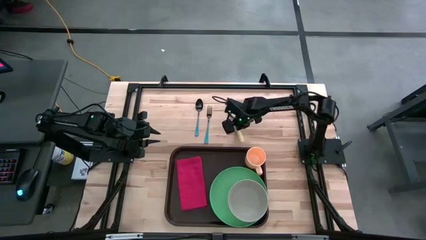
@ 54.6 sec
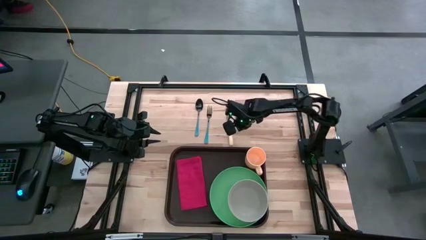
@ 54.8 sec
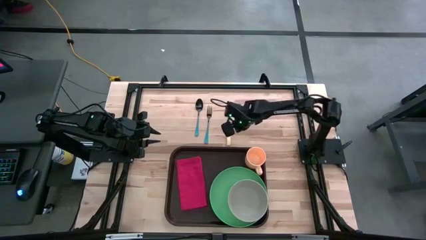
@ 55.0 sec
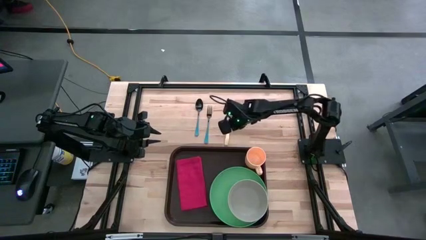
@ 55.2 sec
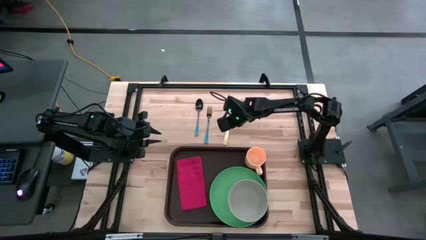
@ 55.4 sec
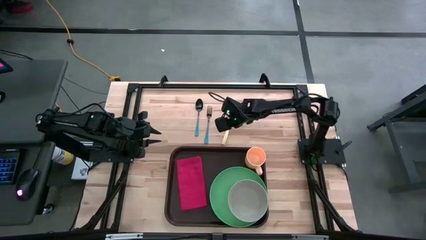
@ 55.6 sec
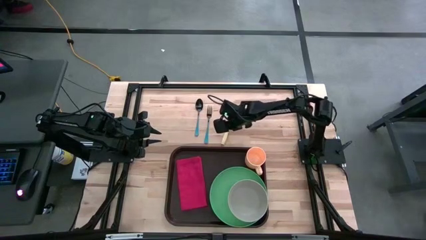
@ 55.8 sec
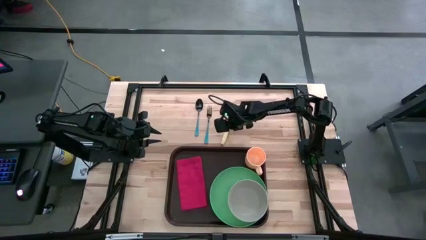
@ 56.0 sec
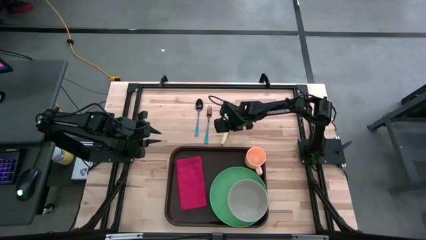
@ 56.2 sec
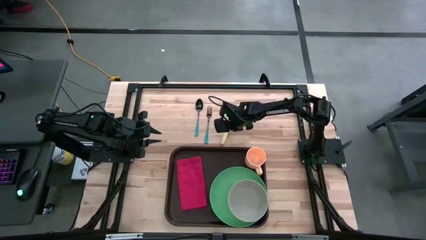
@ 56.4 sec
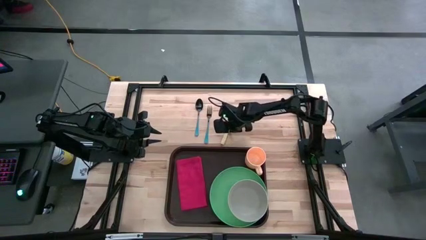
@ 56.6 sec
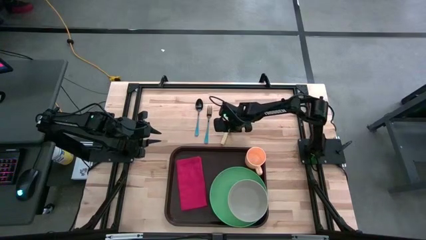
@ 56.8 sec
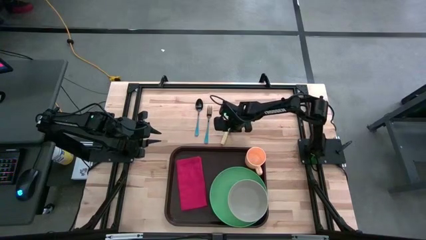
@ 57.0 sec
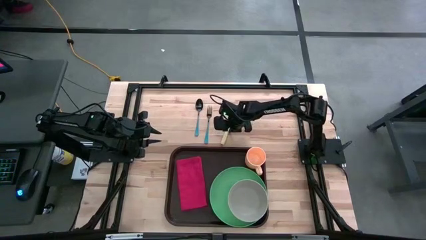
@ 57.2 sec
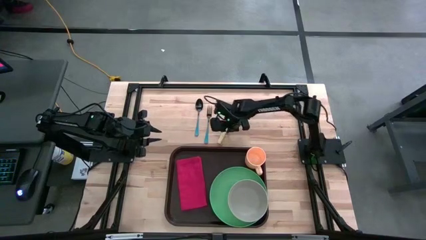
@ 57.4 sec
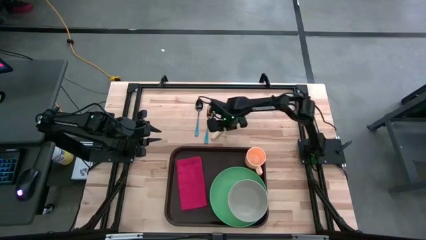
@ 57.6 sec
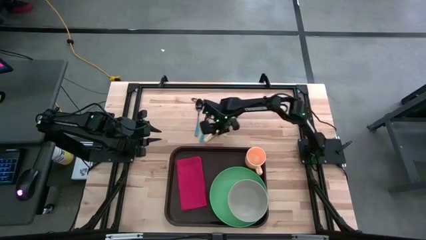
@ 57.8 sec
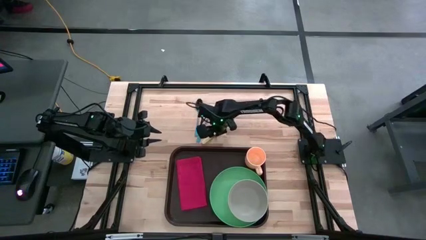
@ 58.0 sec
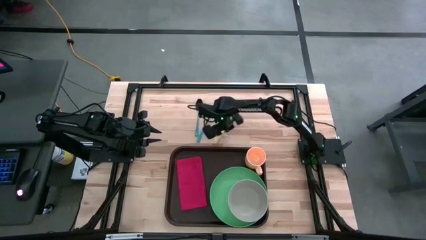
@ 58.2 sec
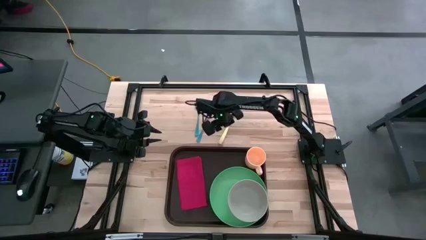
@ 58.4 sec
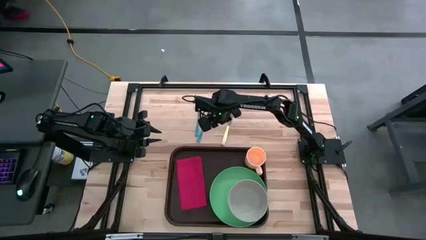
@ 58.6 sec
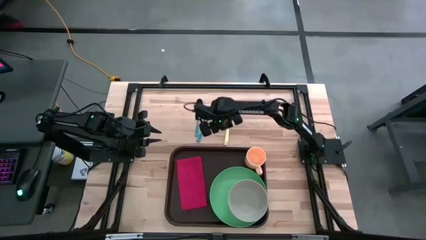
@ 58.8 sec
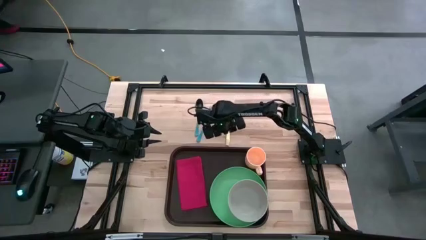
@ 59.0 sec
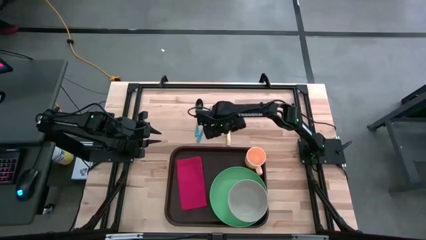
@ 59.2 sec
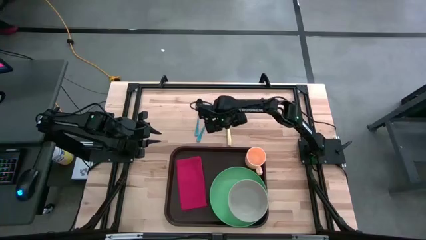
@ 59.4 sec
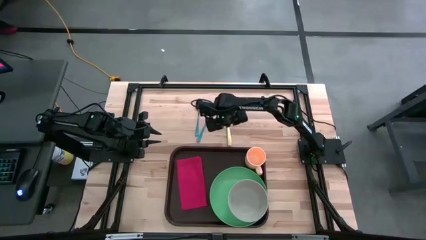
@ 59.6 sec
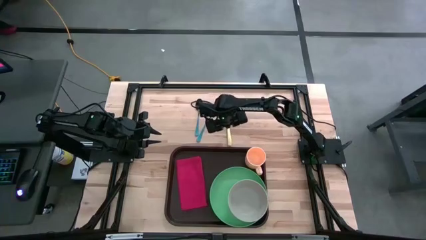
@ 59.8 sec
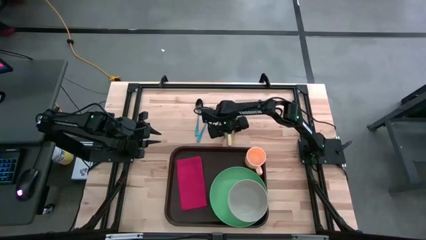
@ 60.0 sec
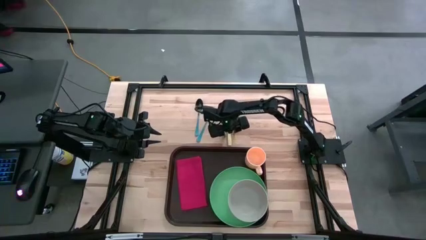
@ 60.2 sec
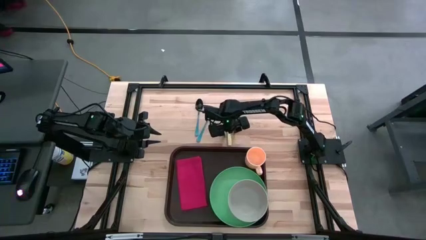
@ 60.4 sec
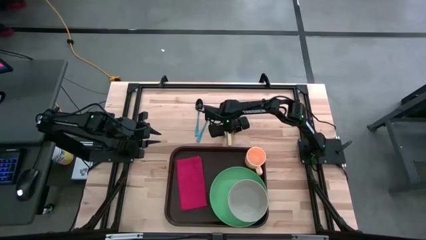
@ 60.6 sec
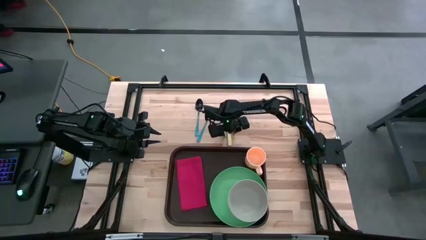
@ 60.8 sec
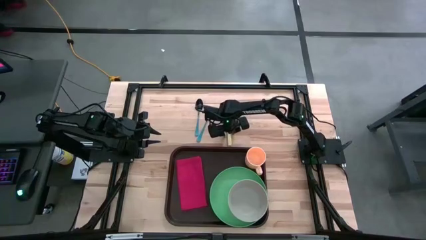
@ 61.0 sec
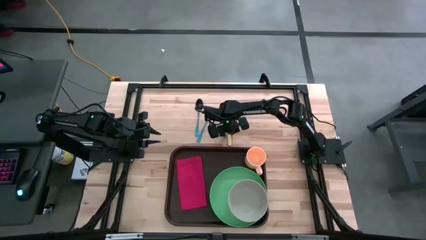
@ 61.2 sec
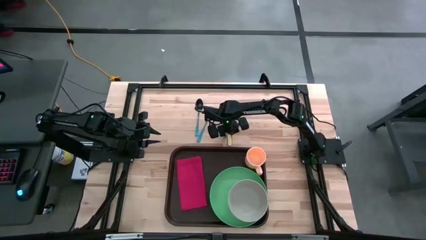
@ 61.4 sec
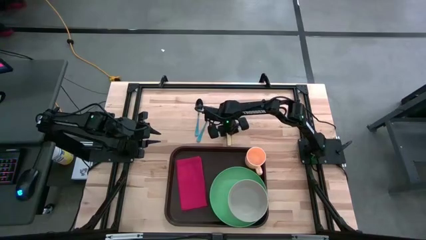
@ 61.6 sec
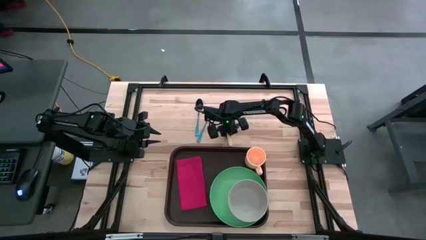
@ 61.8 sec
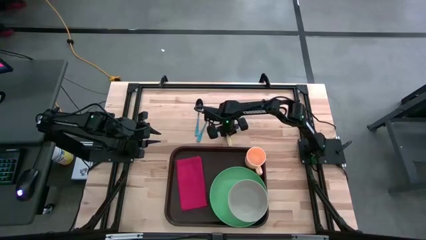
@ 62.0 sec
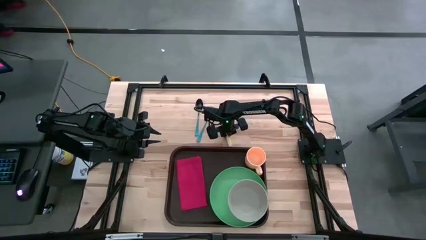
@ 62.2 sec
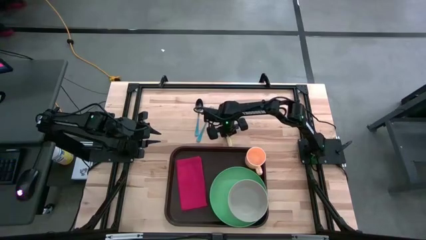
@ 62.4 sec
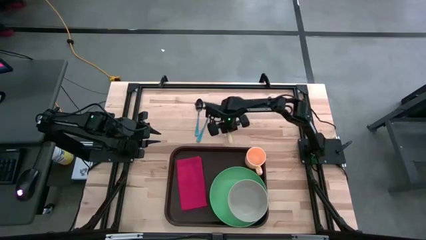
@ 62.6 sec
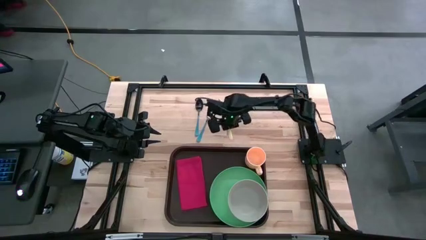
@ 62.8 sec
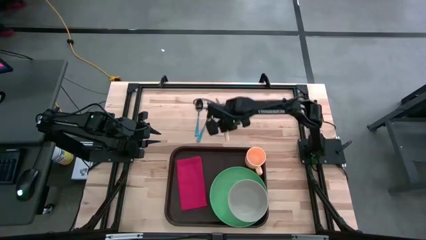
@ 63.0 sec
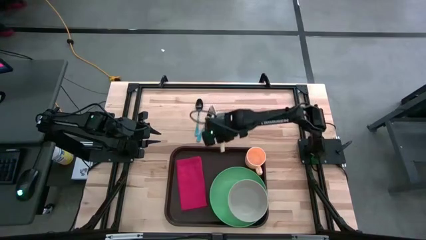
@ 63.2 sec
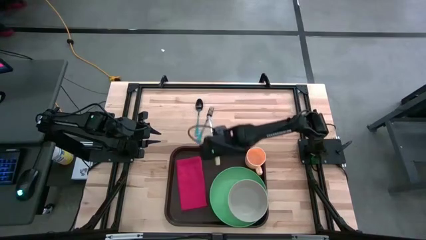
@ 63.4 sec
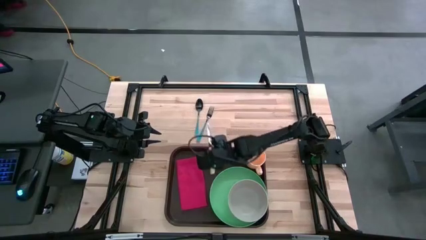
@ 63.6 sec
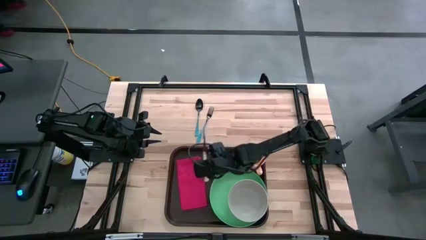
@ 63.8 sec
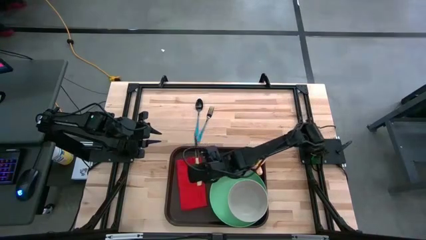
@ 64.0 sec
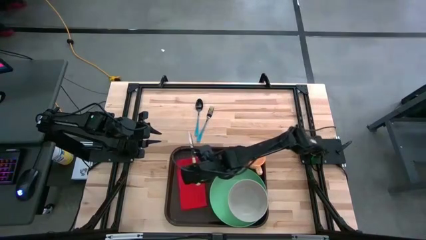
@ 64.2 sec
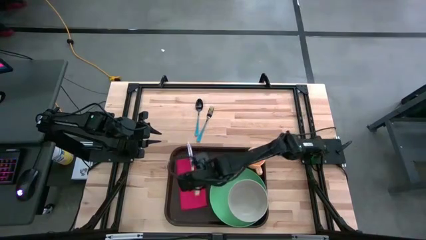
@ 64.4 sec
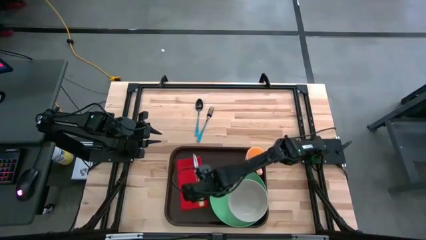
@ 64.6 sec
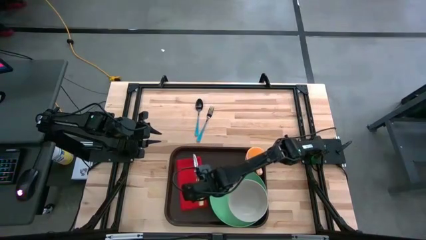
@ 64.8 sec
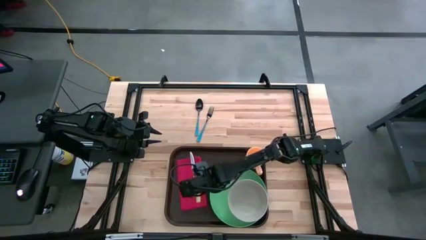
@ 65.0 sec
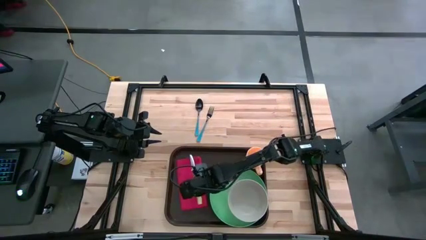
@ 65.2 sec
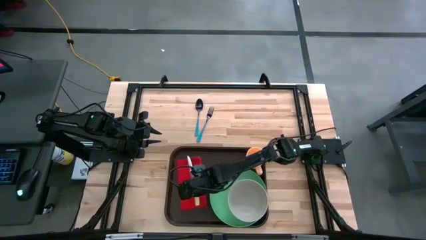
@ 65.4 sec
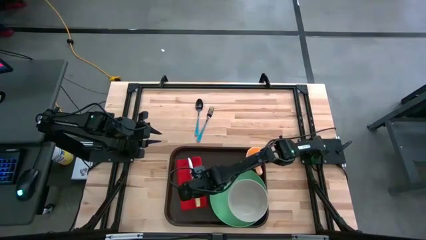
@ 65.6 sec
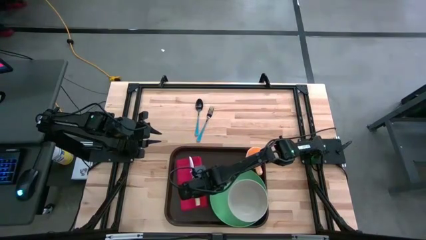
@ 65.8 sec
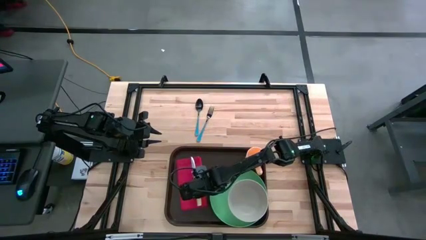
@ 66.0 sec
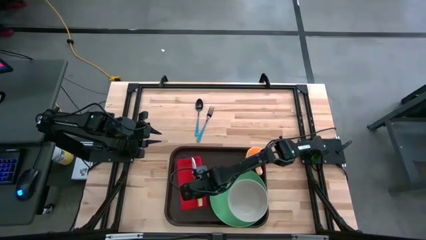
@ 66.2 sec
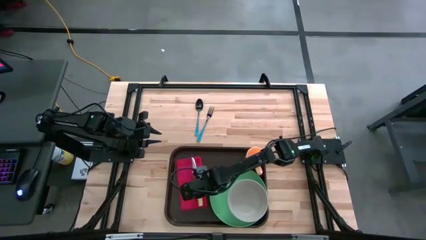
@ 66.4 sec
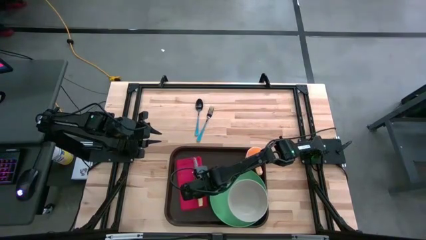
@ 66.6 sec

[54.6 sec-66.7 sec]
Task: Set up tray
Put the yellow knife on top of the red napkin

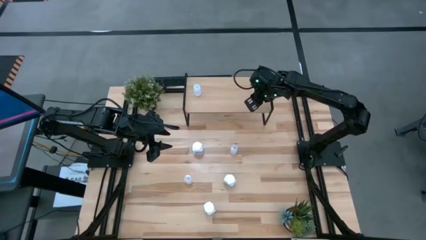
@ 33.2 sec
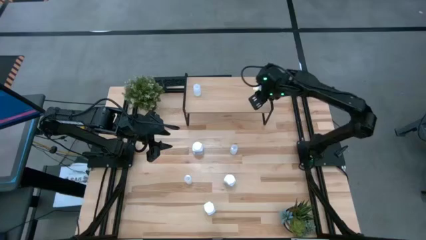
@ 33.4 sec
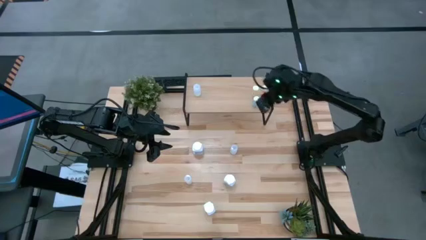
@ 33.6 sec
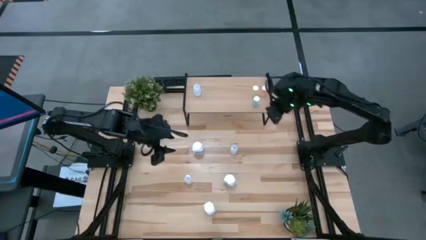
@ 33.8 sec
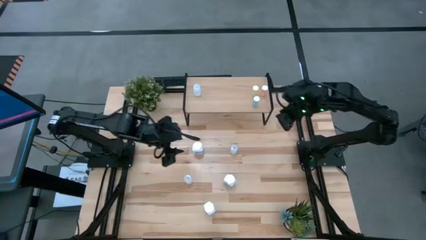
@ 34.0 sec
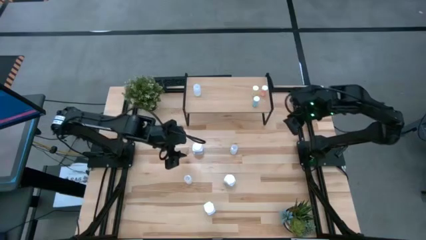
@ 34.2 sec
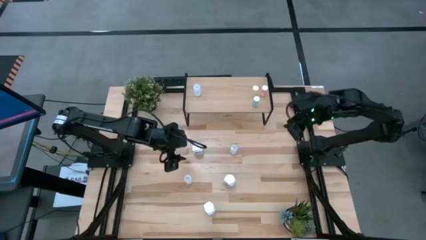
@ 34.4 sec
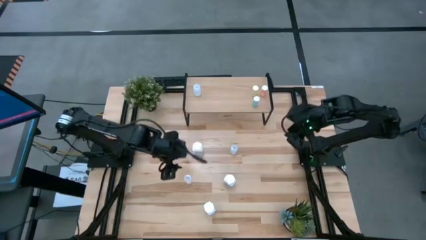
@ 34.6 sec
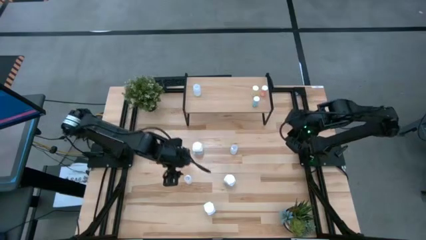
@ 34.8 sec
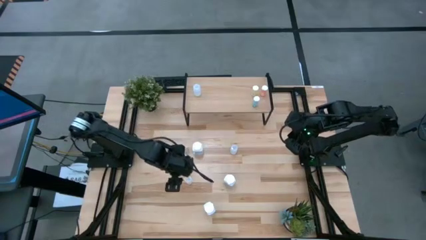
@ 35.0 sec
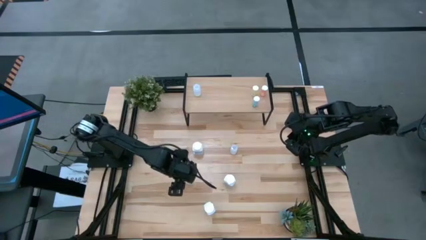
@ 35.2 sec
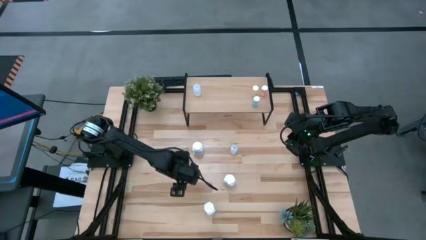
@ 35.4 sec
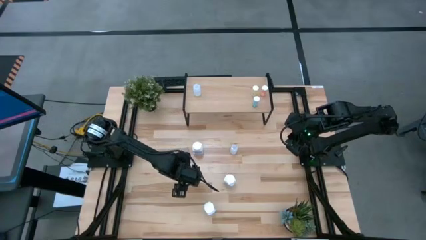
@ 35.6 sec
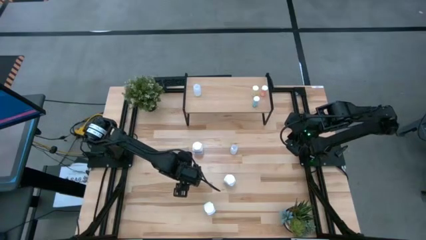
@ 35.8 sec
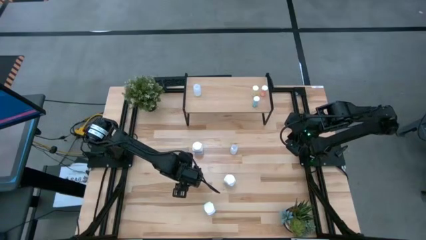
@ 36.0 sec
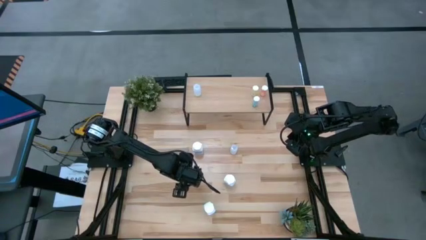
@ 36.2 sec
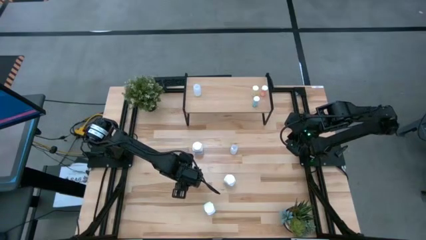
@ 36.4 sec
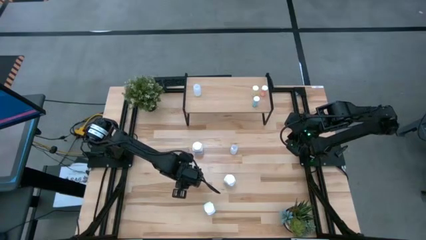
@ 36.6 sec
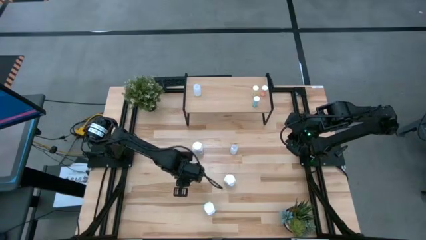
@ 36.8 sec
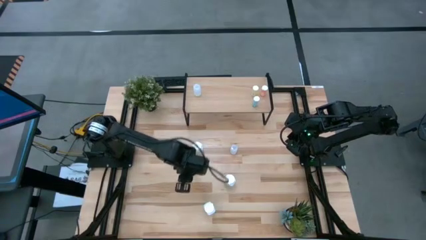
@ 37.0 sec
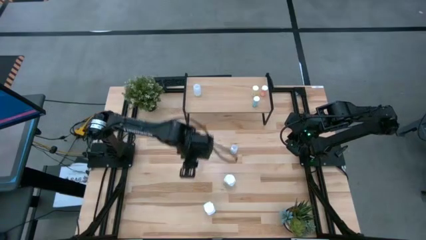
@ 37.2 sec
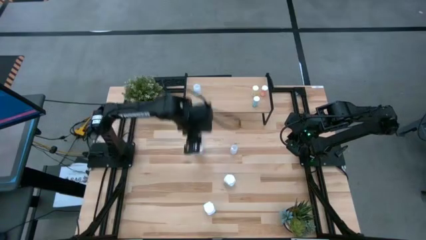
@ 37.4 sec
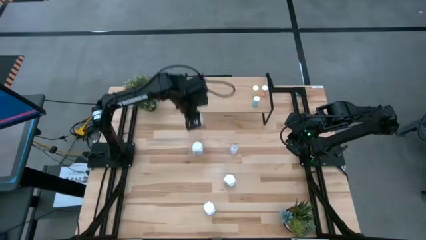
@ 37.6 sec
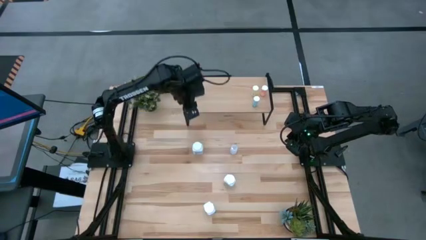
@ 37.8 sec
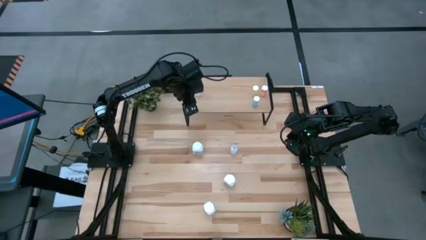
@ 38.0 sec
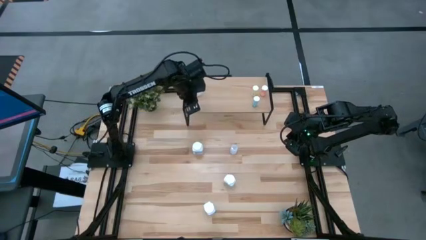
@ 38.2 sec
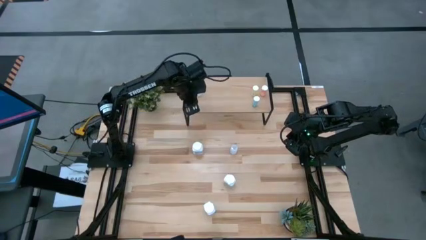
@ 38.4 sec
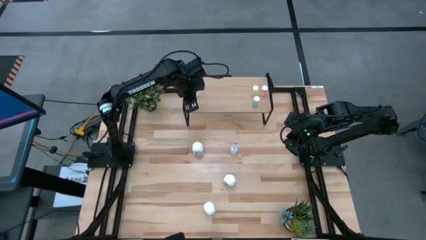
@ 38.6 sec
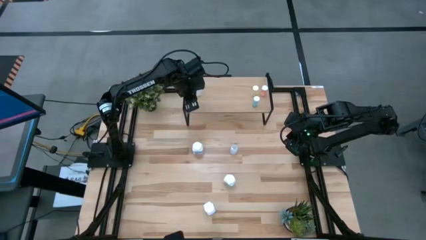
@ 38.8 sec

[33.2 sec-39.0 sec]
Task: Pick and place medicine bottles onto shelf by color
Put the left transparent pill bottle on the shelf
